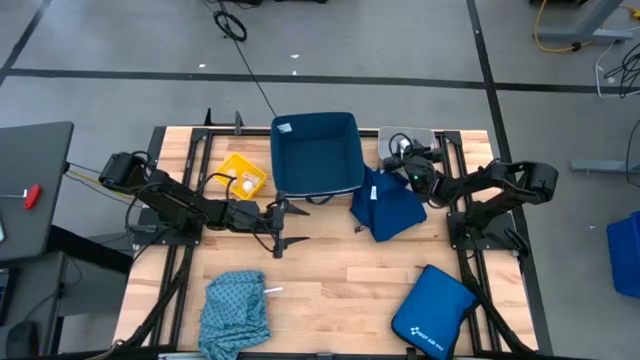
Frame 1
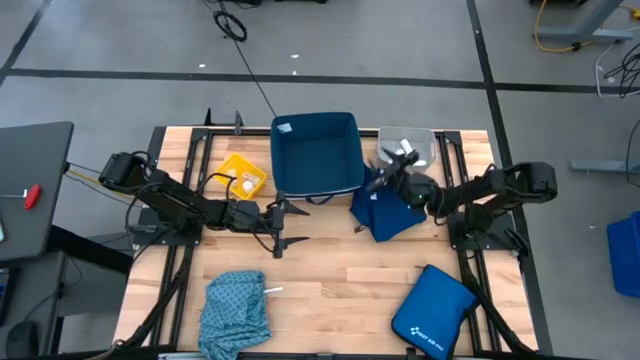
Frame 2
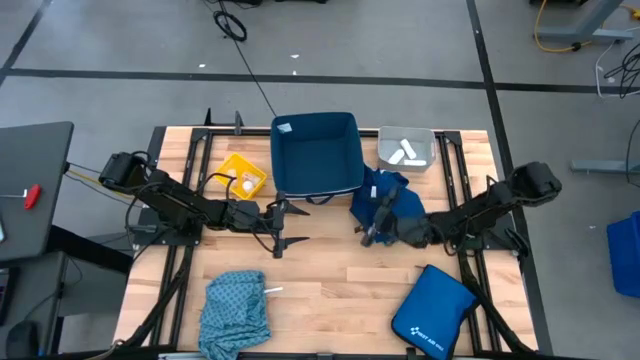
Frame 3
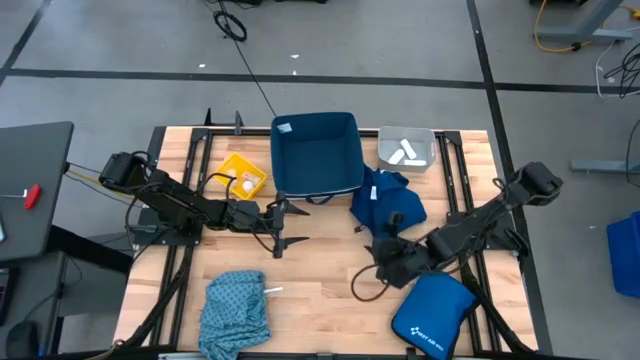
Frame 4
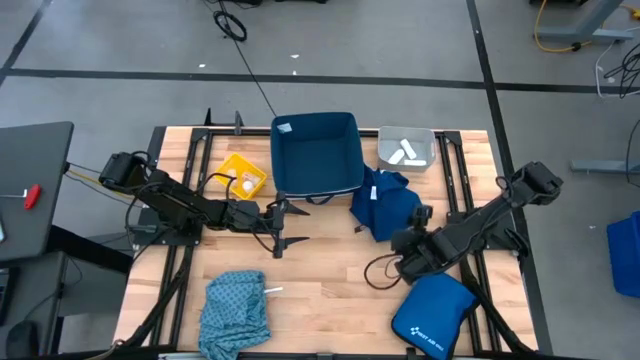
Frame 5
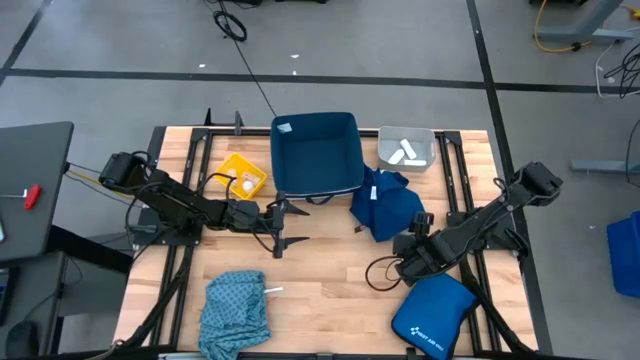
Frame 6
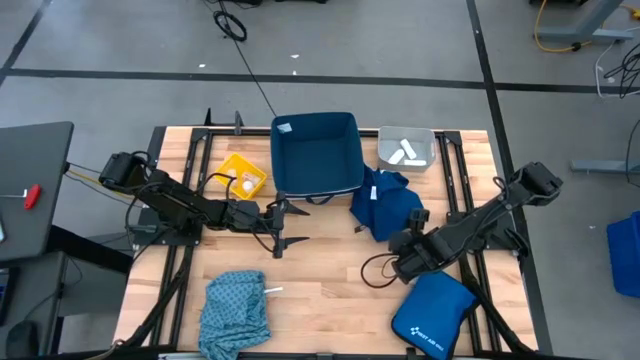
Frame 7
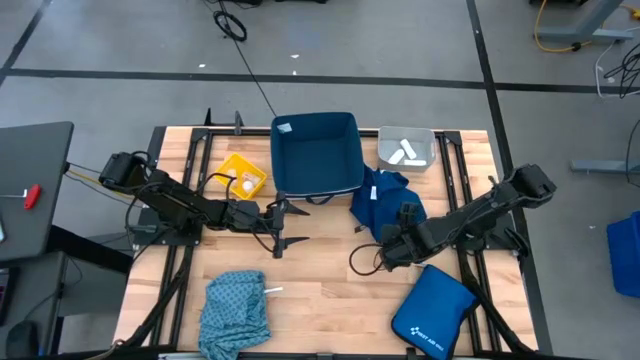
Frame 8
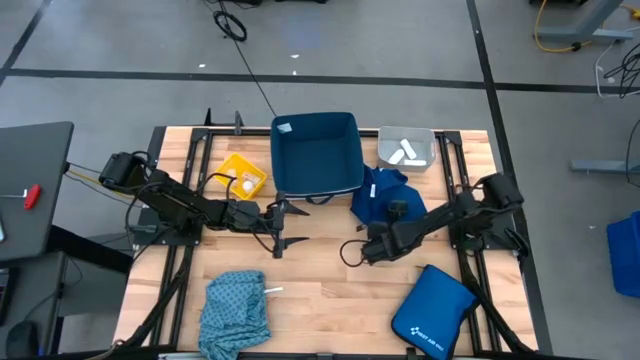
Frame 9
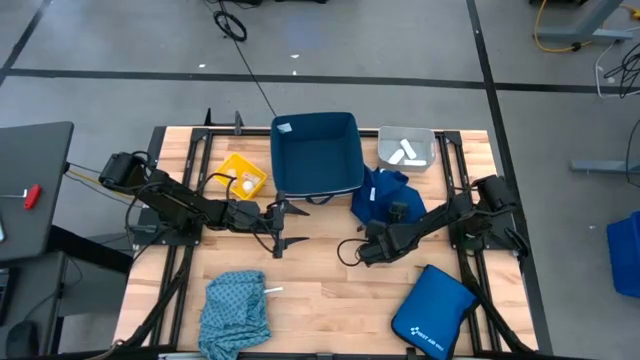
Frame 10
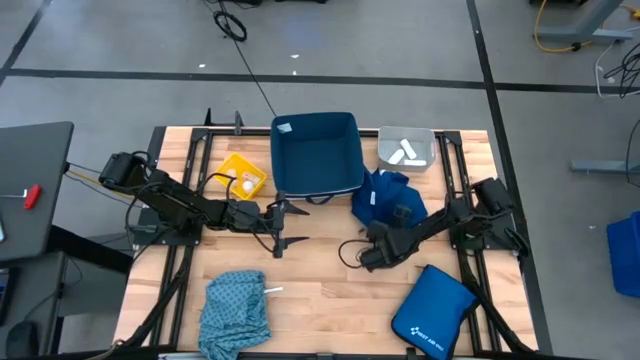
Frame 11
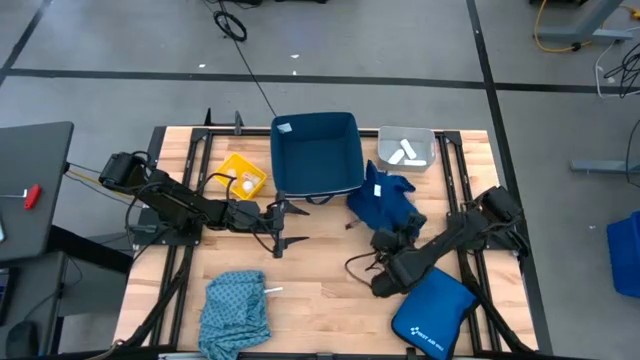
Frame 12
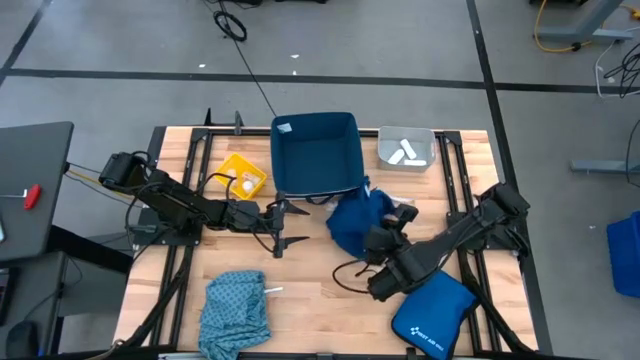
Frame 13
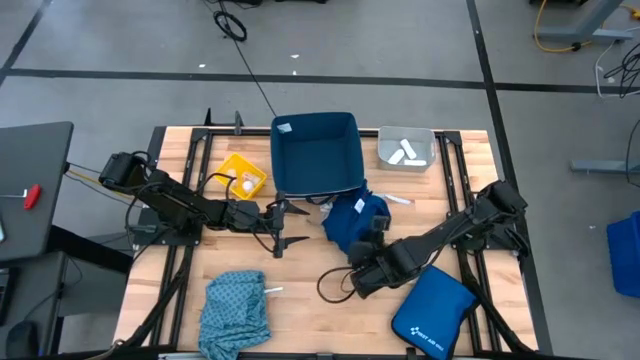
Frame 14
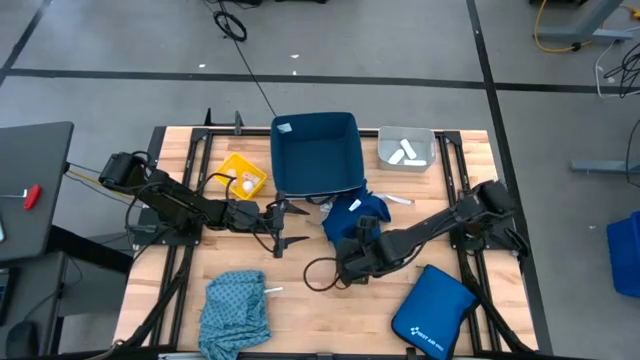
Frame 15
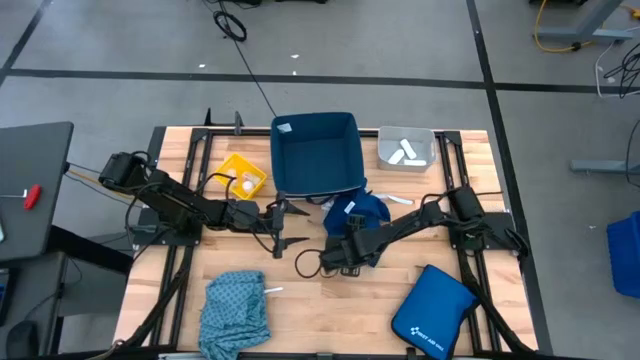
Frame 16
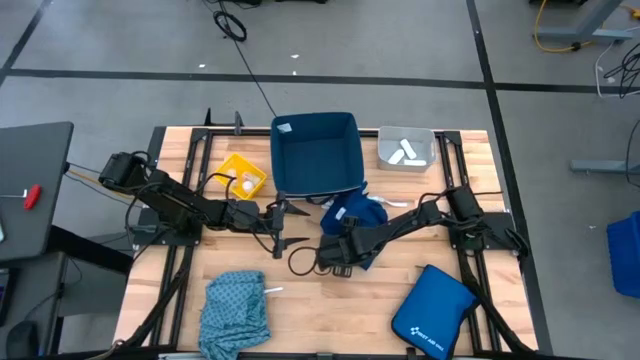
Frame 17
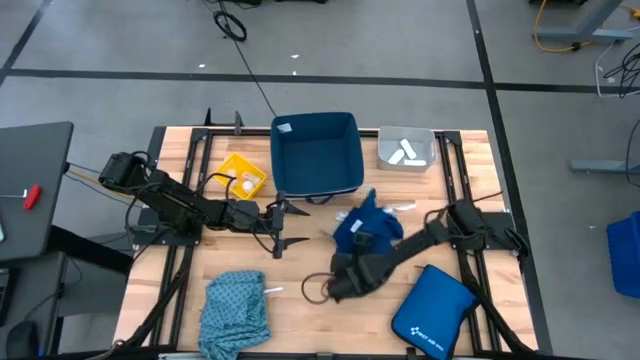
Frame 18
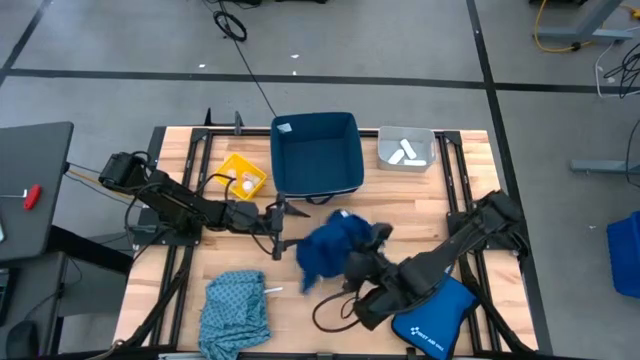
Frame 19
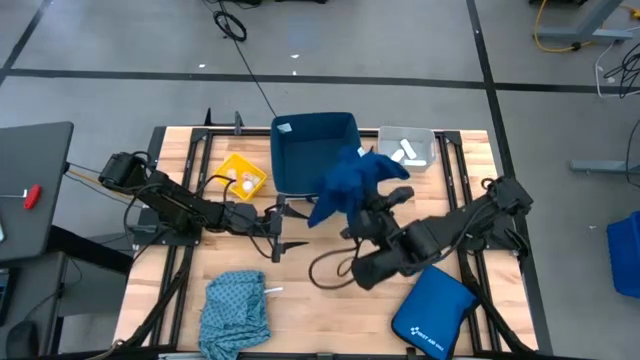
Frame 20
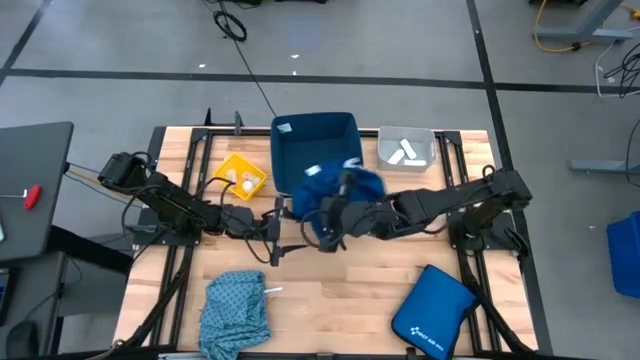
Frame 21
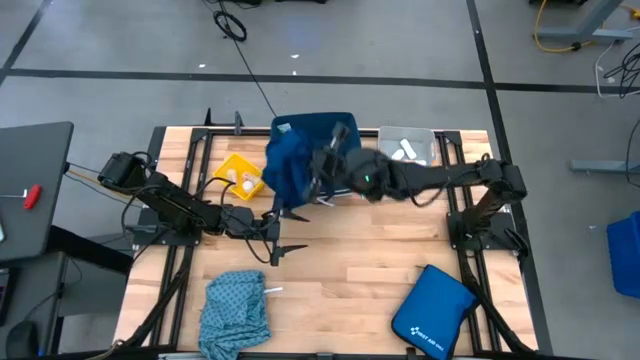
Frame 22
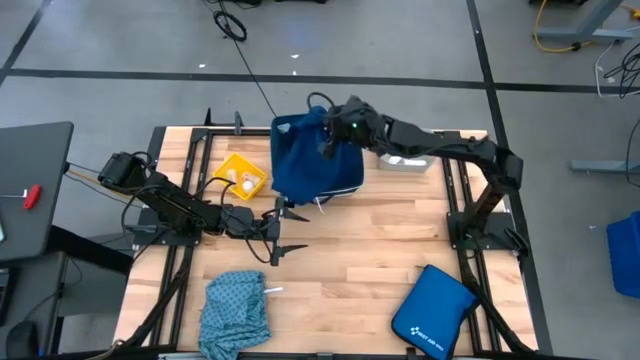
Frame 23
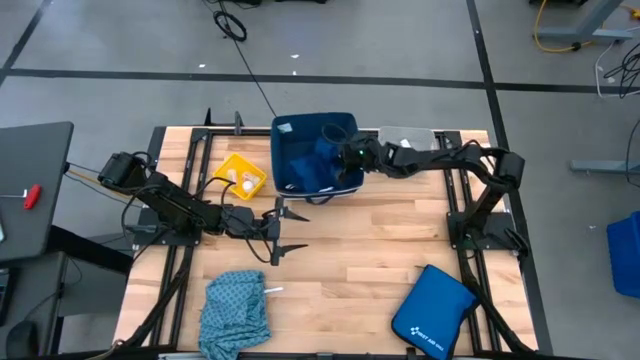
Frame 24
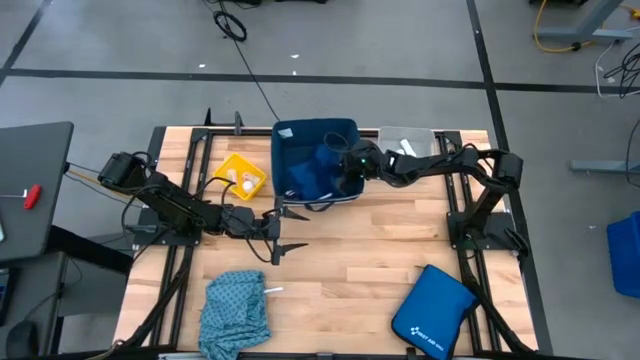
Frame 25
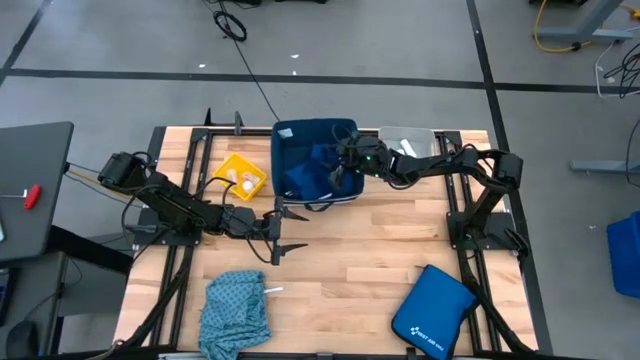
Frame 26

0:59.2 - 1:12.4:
Task: Pick & place medical supplies in basket/bin
Put the blue patient gown into the blue bin

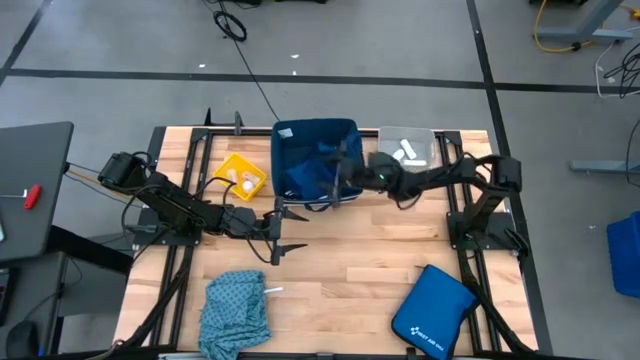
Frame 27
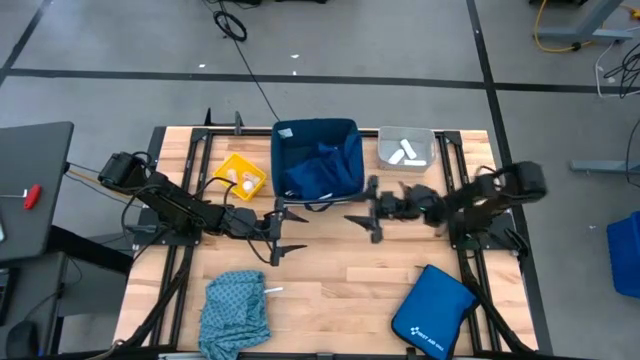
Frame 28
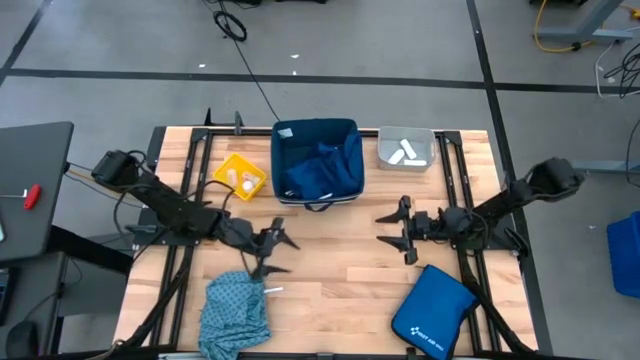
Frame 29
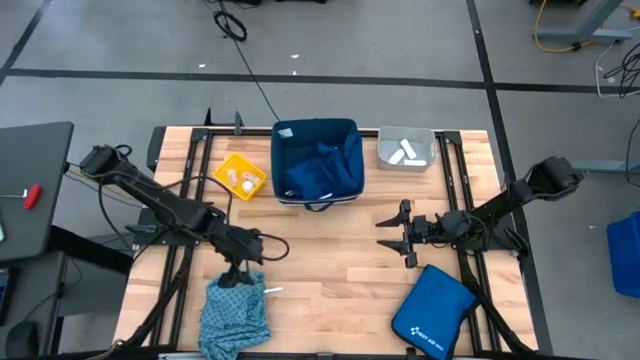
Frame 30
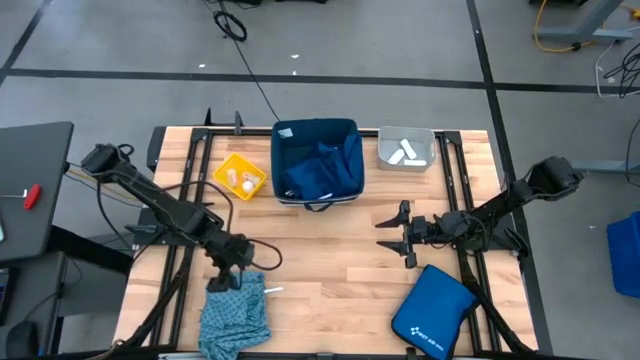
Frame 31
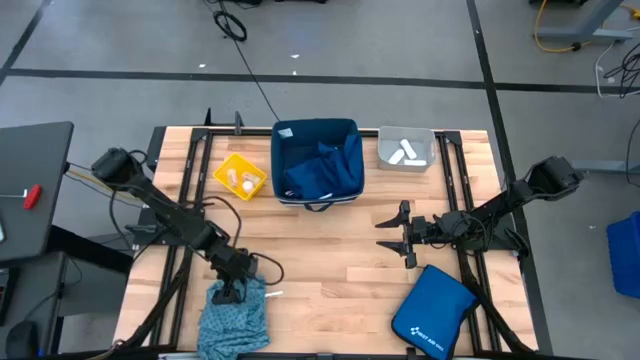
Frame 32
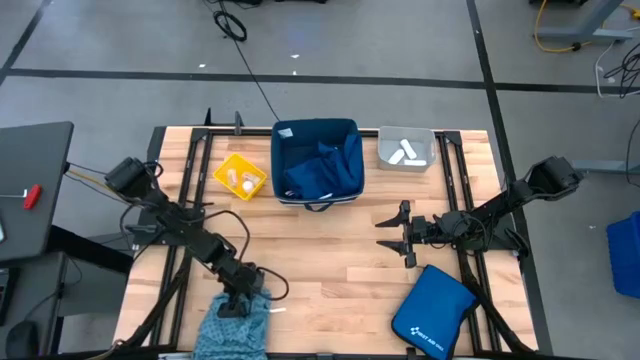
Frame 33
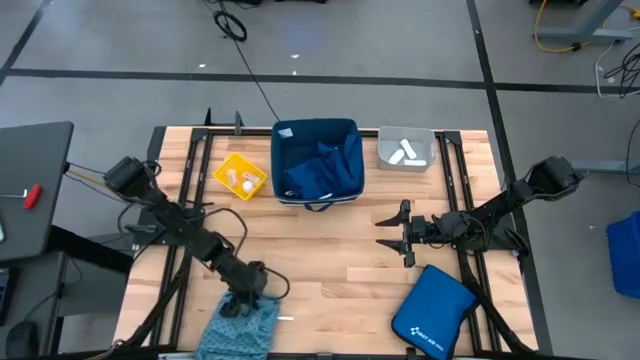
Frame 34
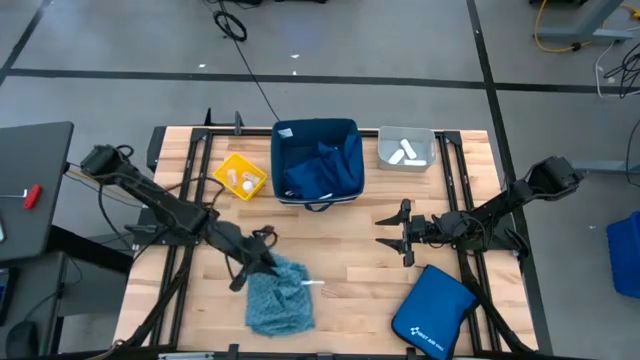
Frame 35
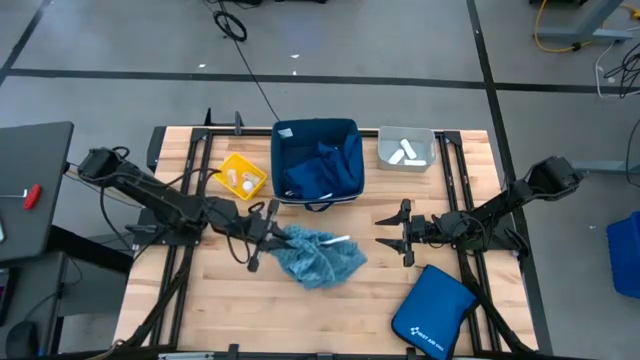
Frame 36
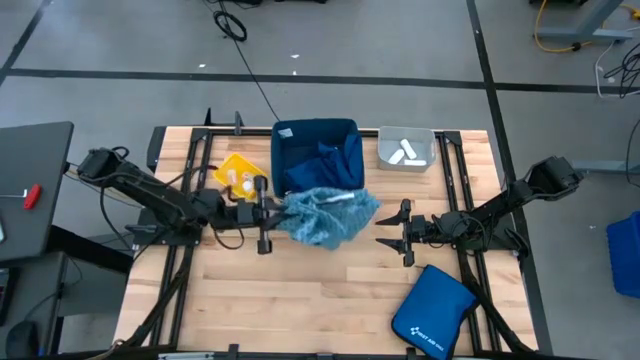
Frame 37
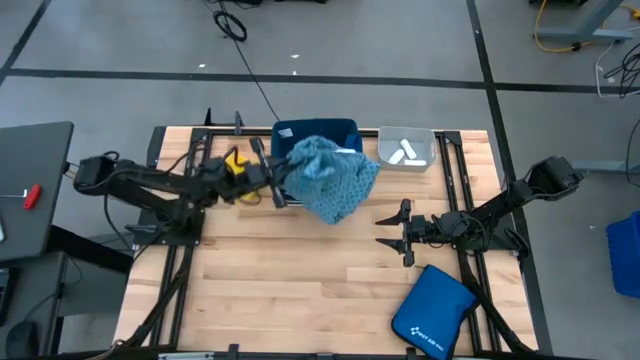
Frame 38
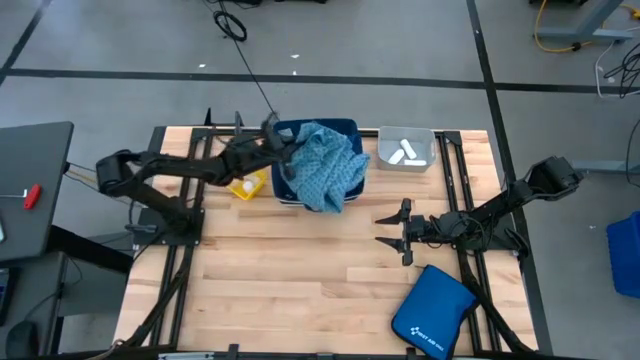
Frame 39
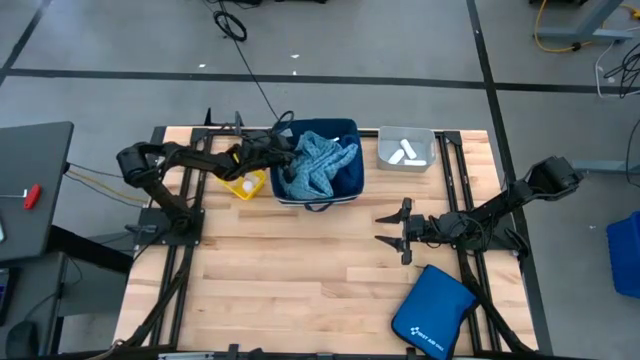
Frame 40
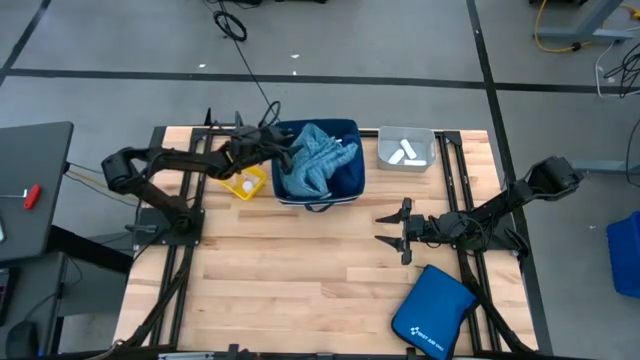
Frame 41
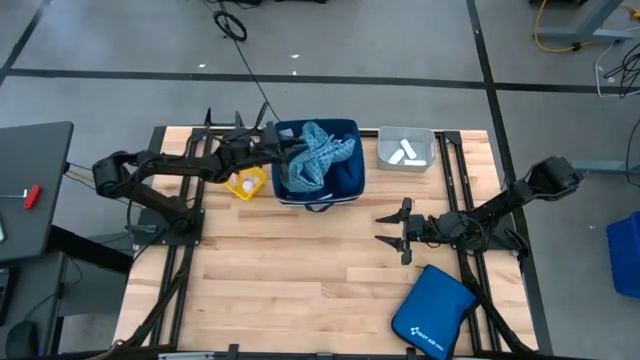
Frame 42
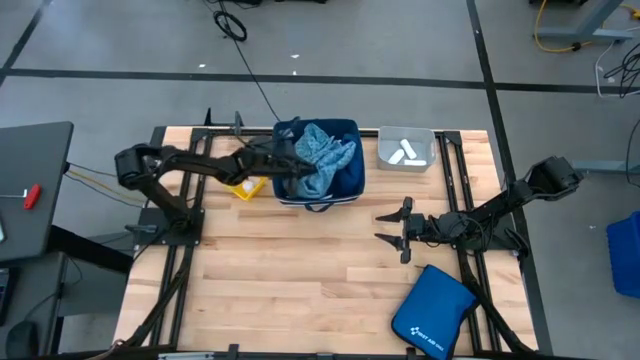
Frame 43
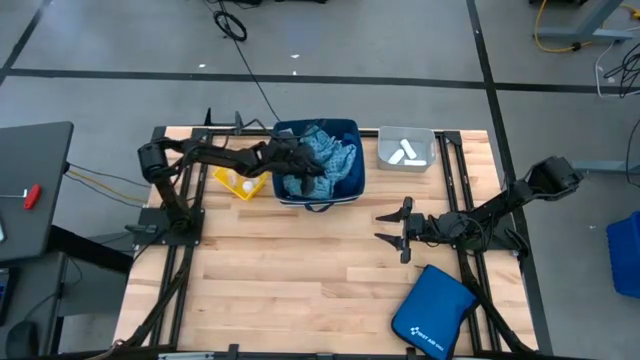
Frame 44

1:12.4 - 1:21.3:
Put the blue printed patient gown into the blue bin
